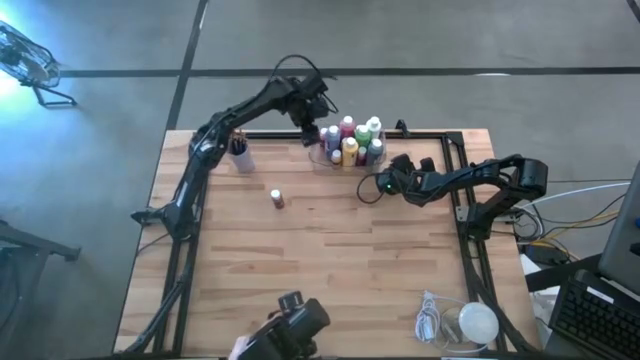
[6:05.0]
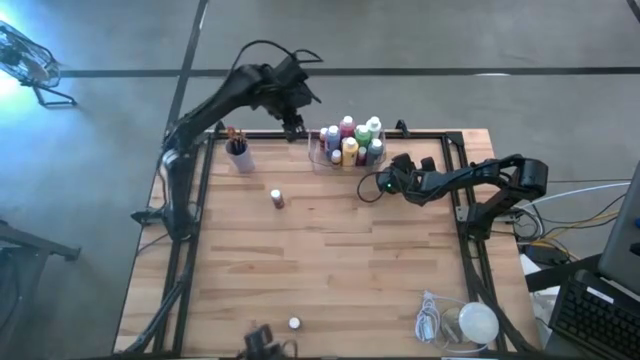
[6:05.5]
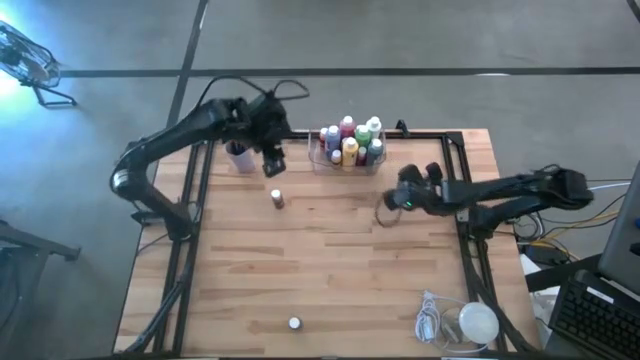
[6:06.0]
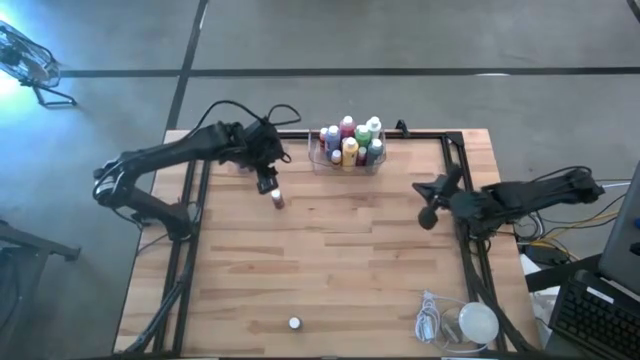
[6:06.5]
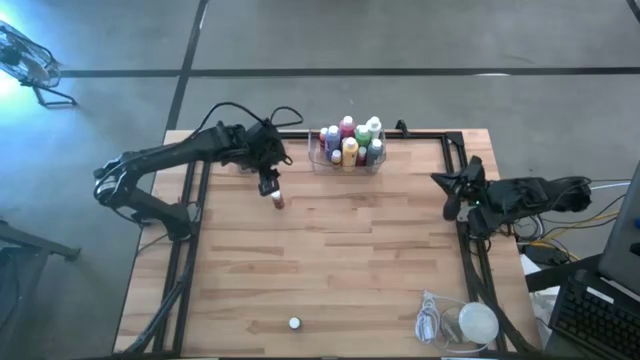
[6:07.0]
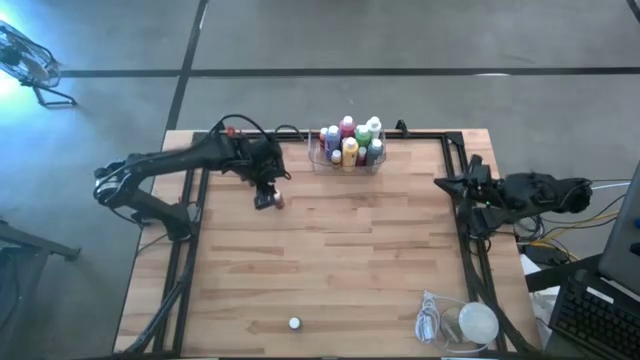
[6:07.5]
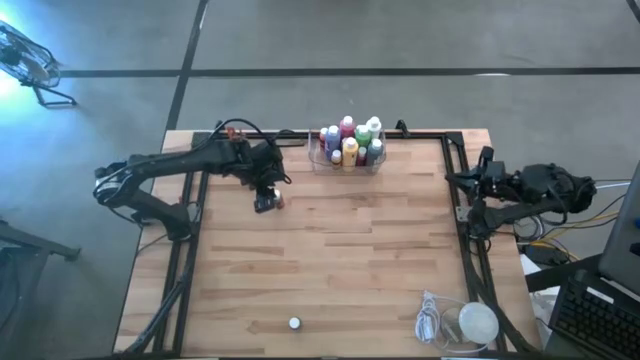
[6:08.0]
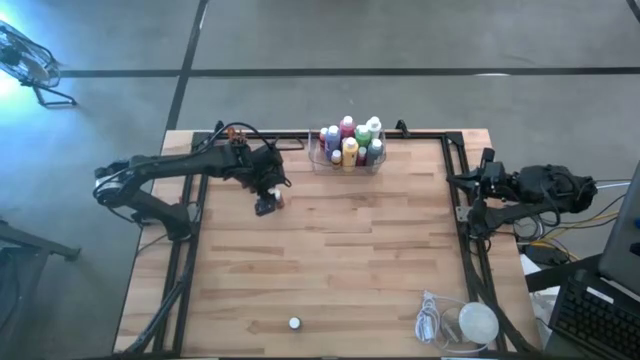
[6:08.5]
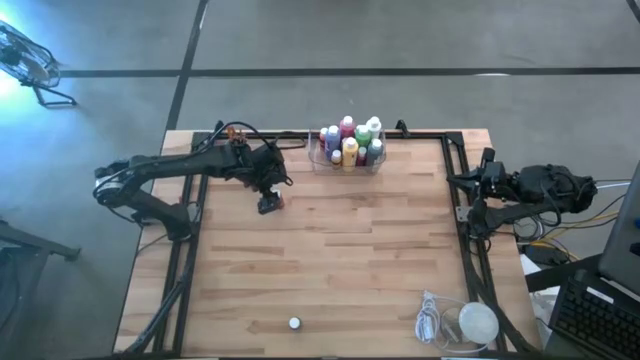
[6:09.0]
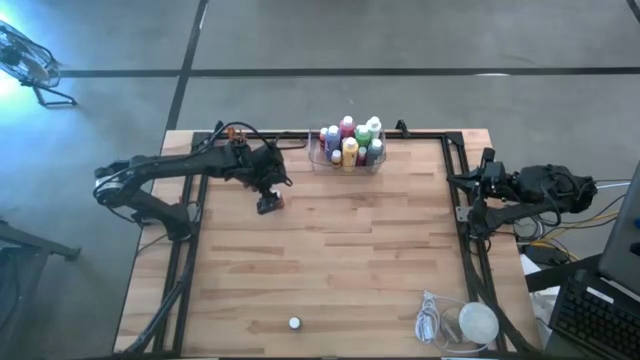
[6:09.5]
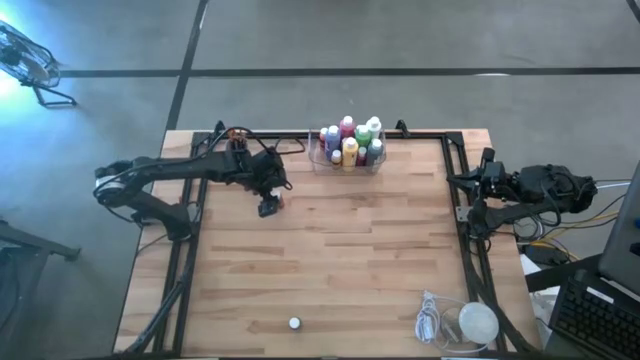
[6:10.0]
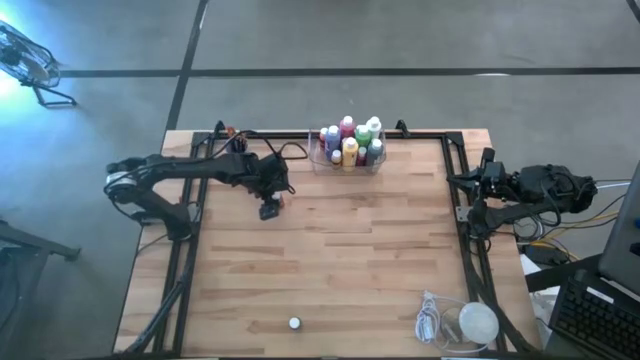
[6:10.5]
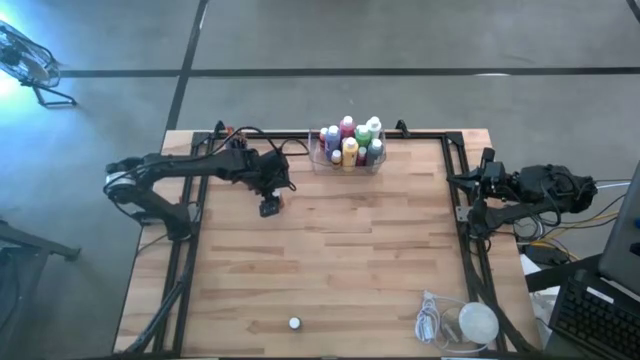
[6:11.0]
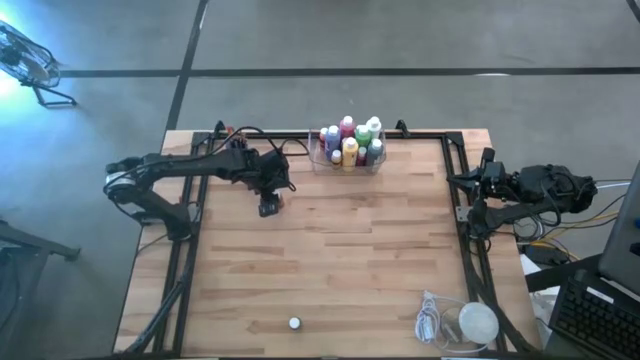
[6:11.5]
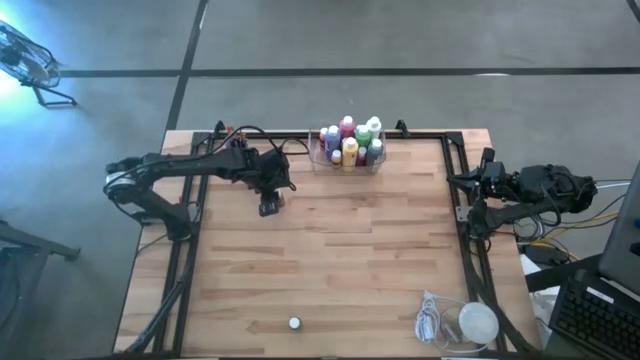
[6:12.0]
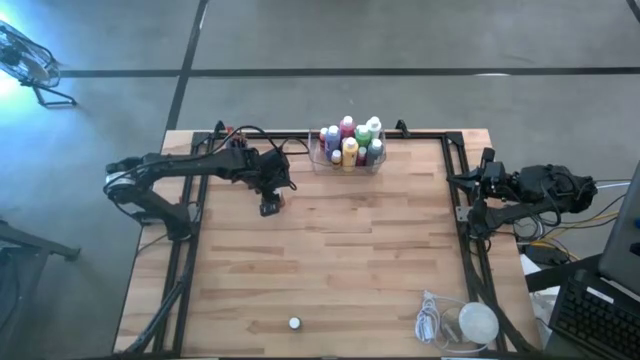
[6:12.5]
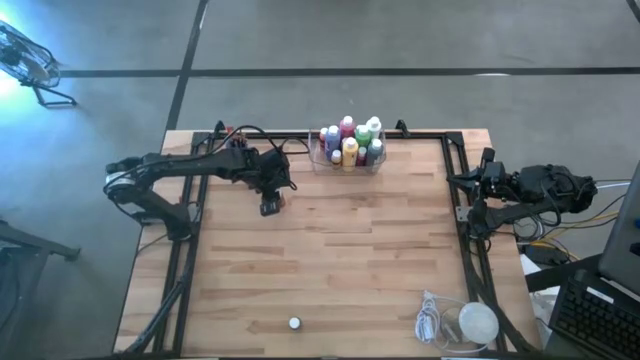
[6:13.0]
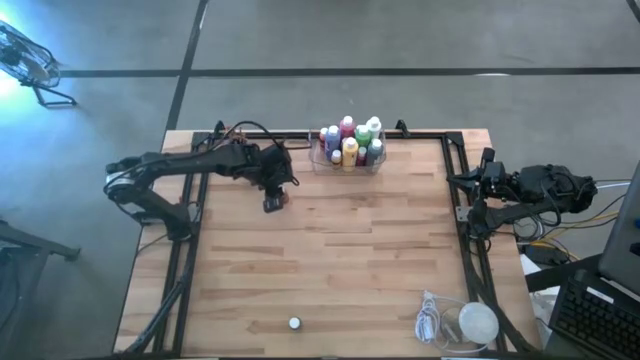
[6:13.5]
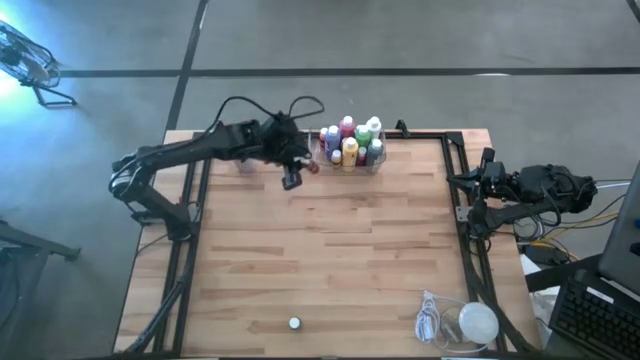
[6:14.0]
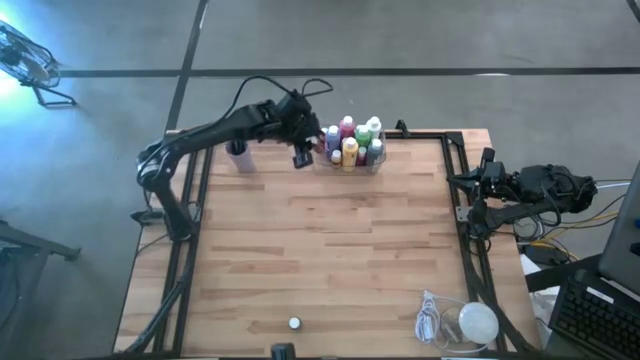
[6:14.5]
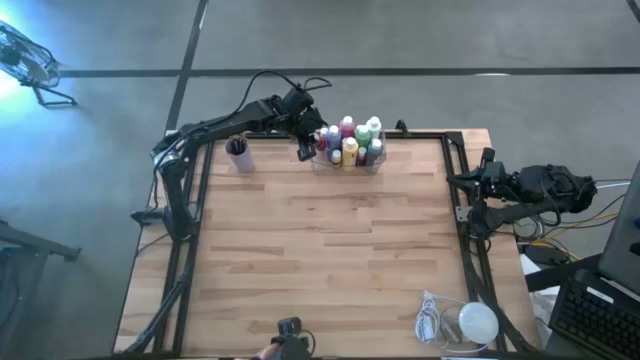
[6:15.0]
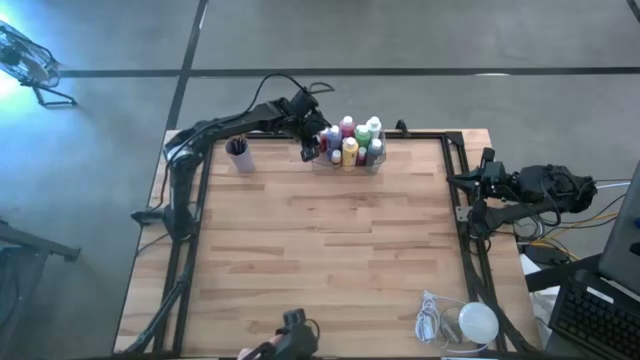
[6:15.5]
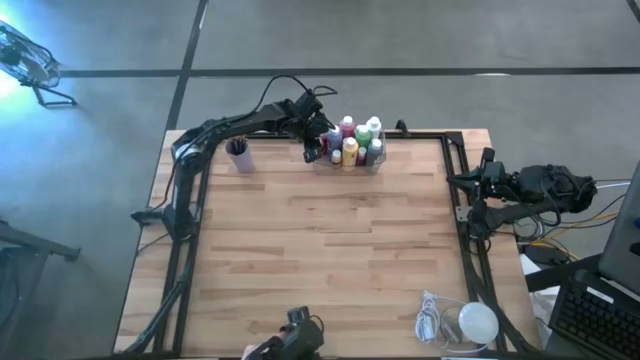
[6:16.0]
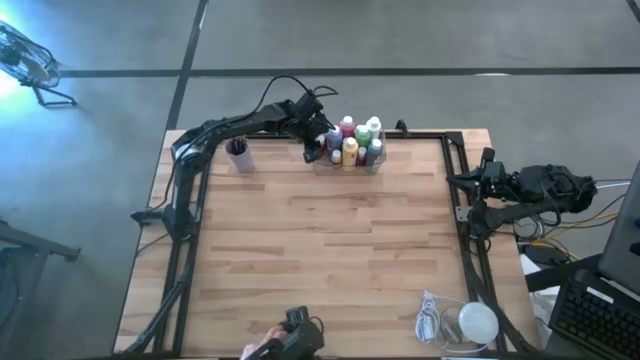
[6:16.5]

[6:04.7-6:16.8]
Task: Pick & Place Paint Supplies
Put the brown paint bottle into the transparent bin

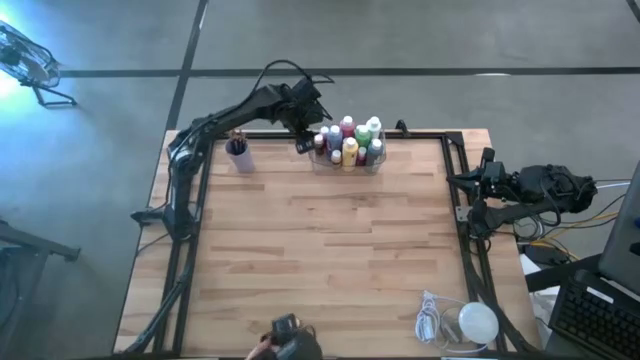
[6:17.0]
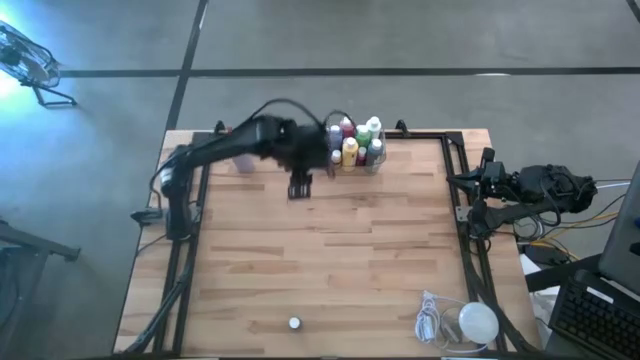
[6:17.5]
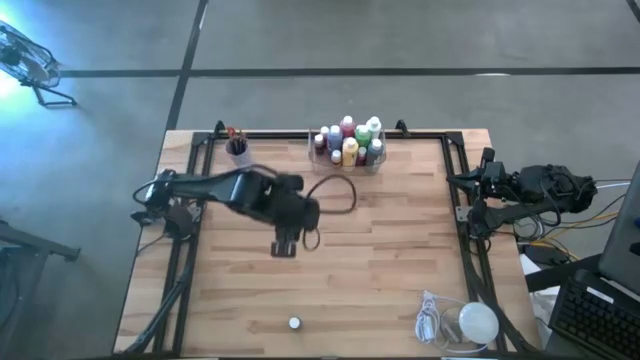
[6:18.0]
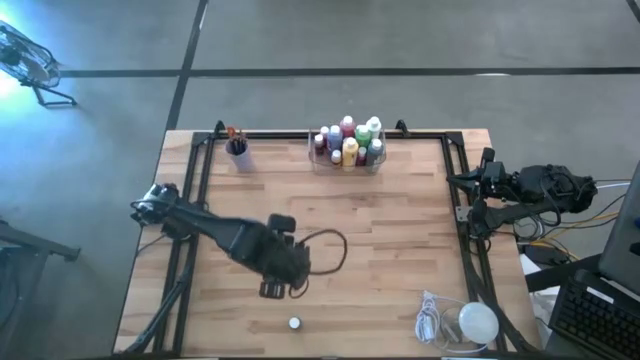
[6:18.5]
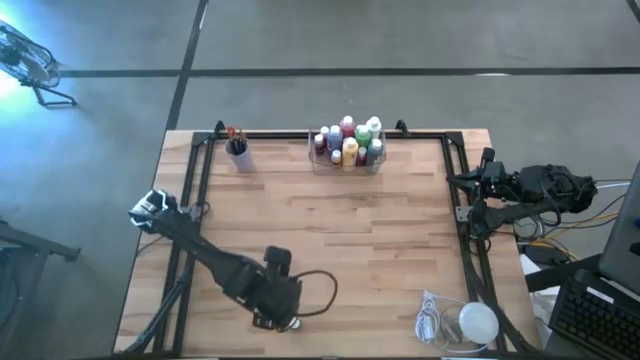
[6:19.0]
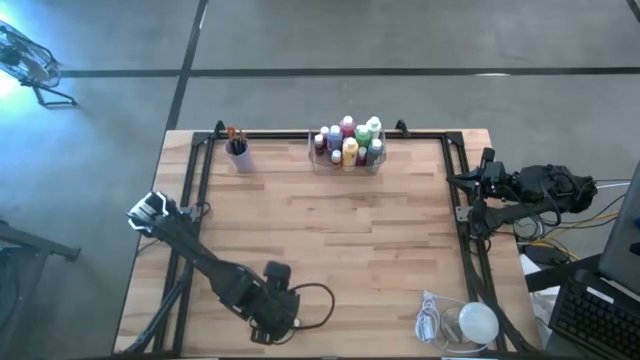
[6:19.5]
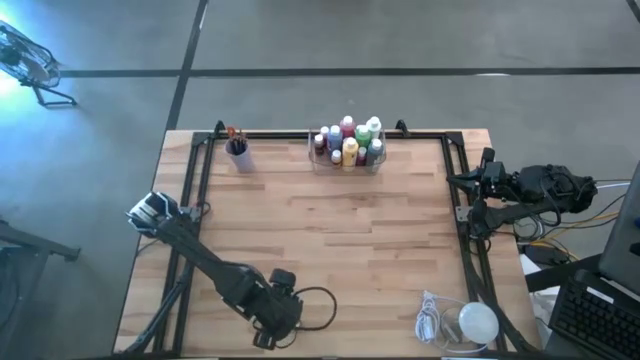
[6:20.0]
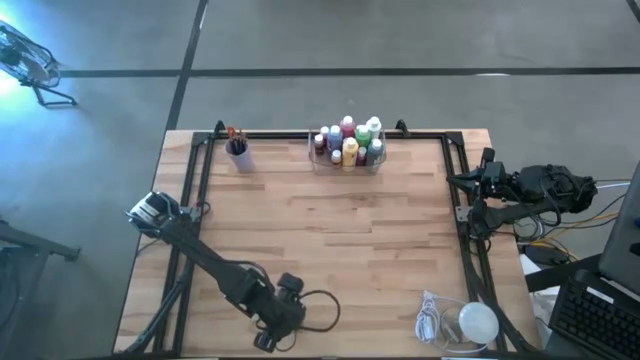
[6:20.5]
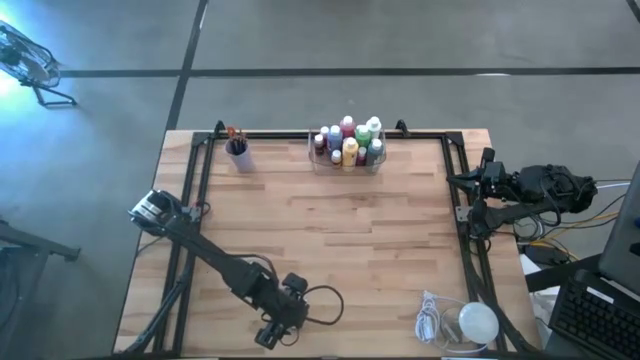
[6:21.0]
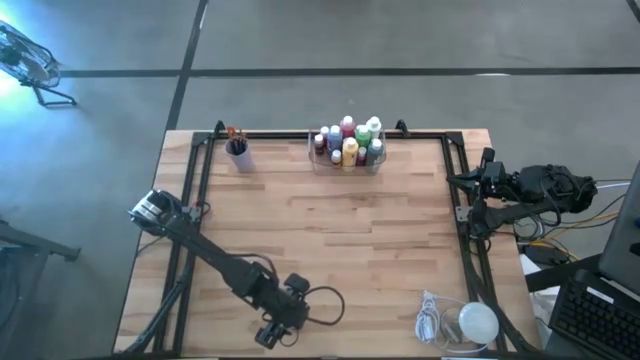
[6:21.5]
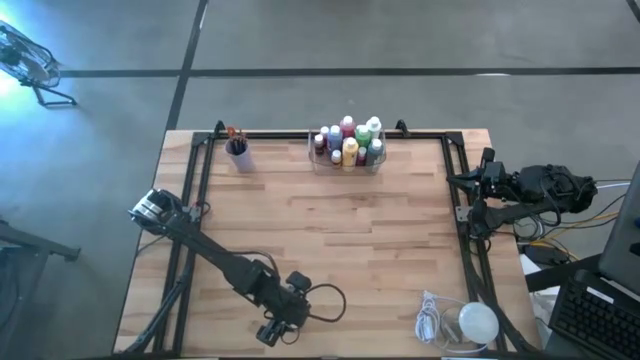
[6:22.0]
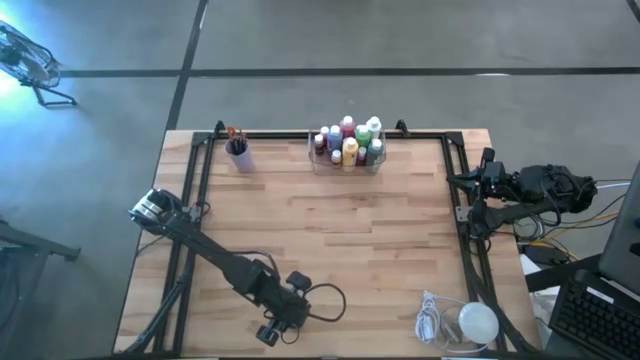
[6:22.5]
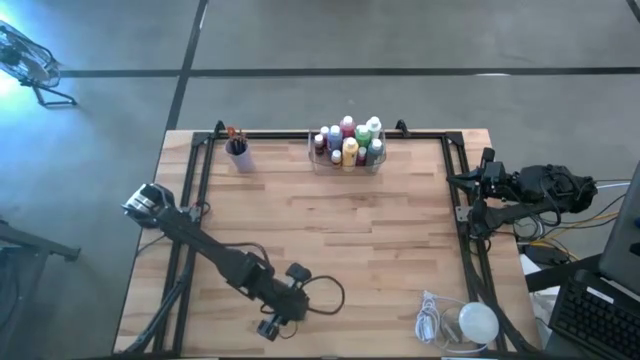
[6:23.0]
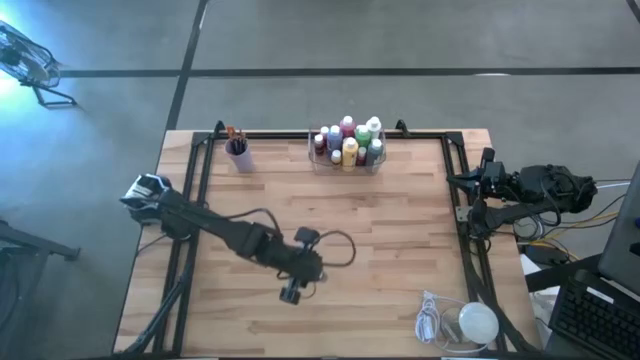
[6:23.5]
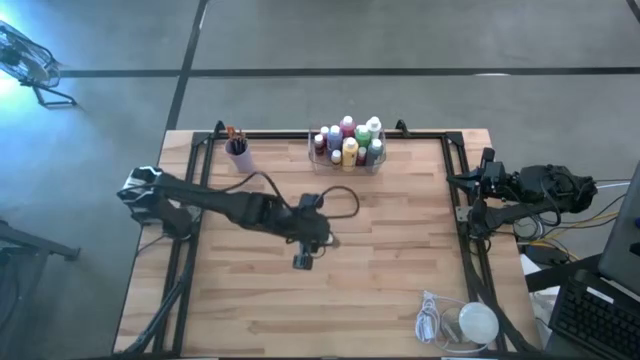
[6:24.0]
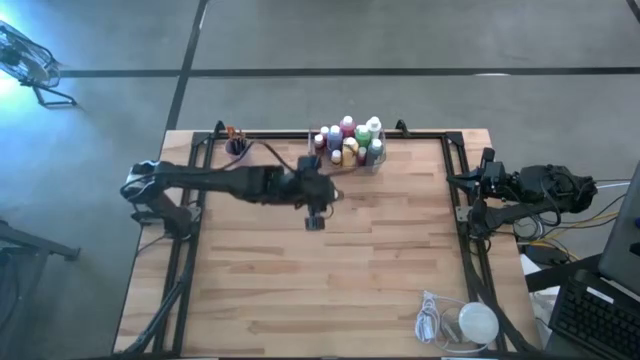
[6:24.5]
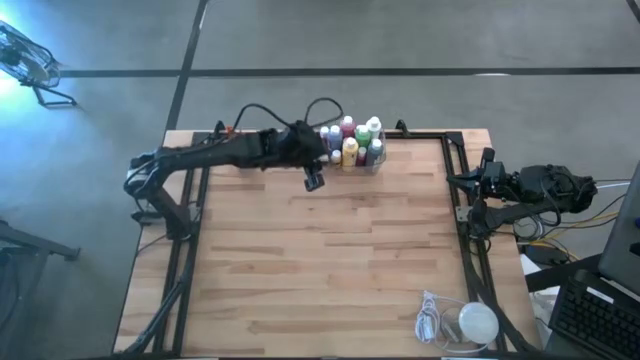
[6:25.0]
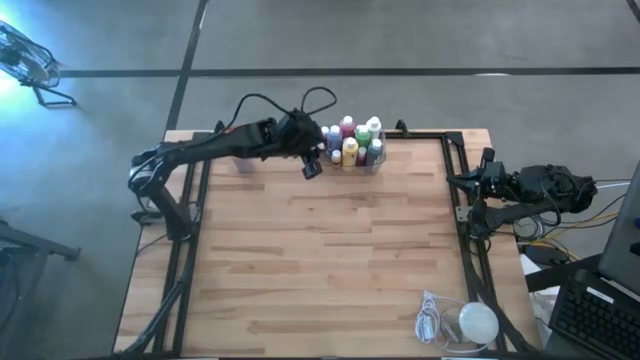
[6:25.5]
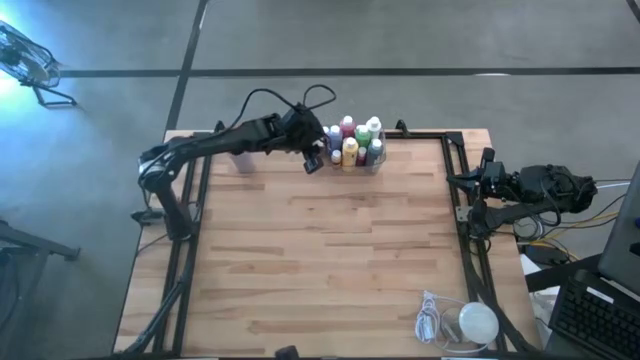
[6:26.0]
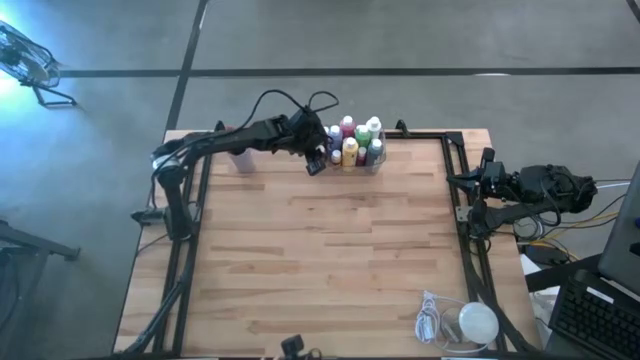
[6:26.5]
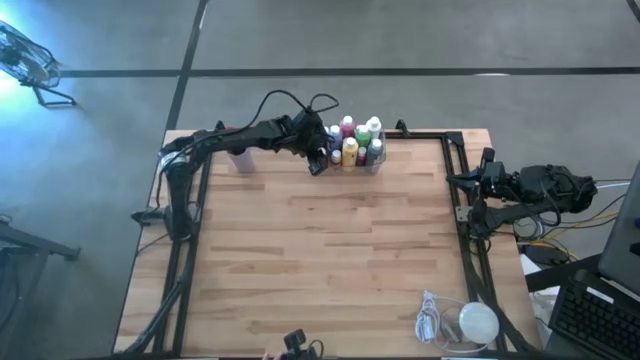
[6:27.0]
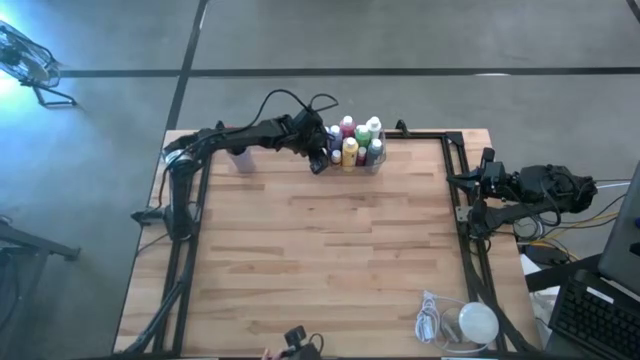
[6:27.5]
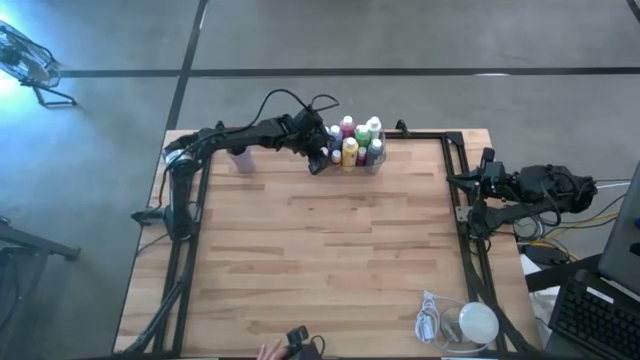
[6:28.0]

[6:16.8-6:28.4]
Put the black paint bottle into the transparent bin
